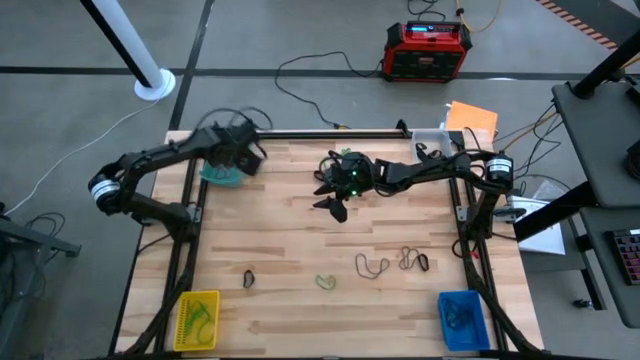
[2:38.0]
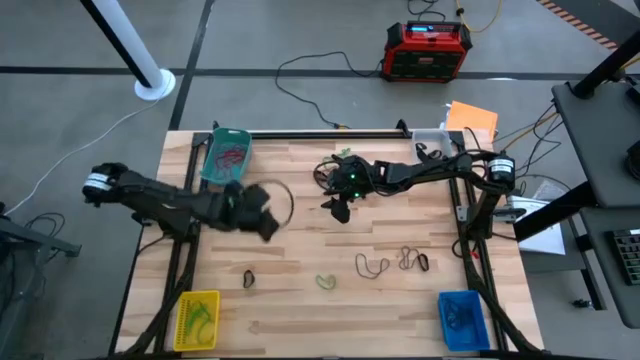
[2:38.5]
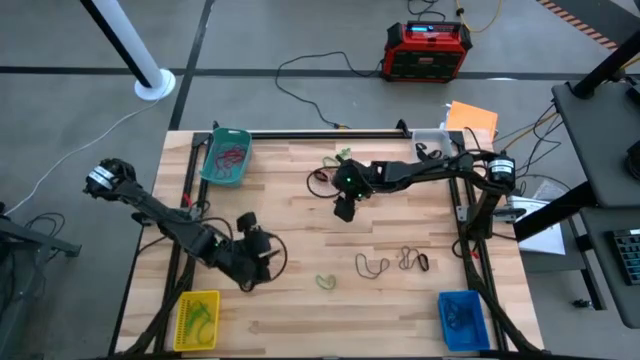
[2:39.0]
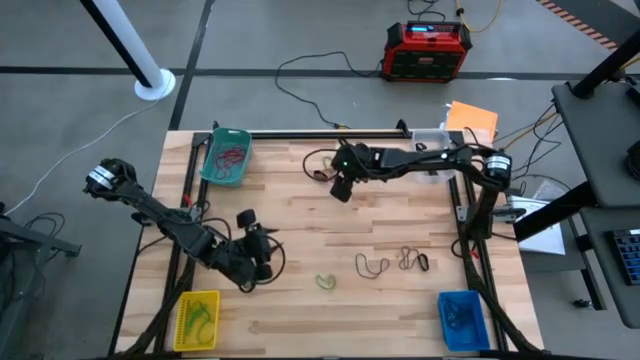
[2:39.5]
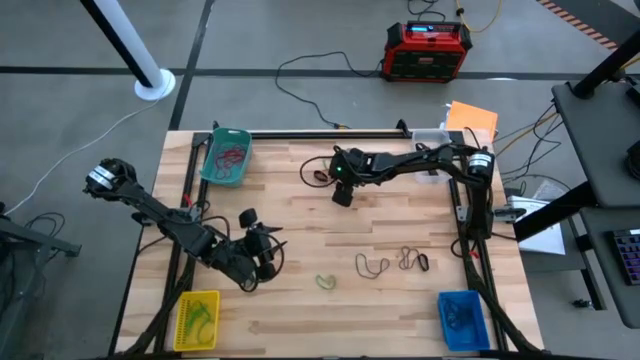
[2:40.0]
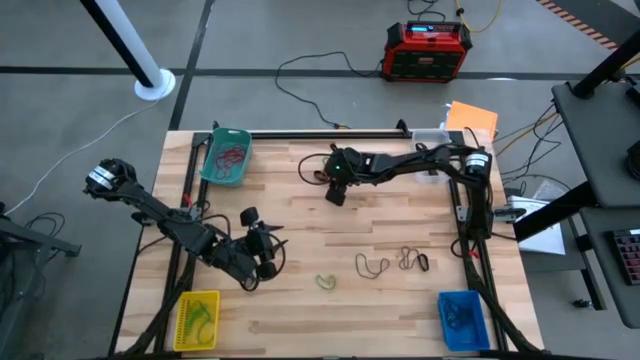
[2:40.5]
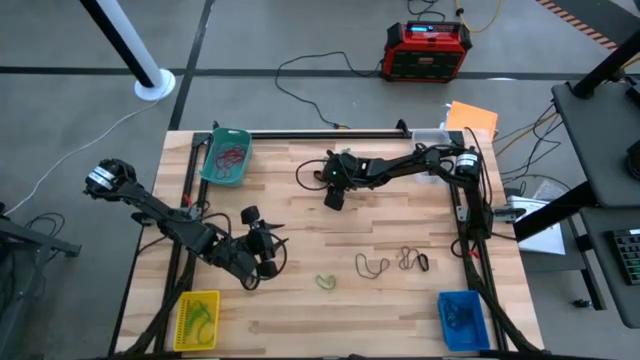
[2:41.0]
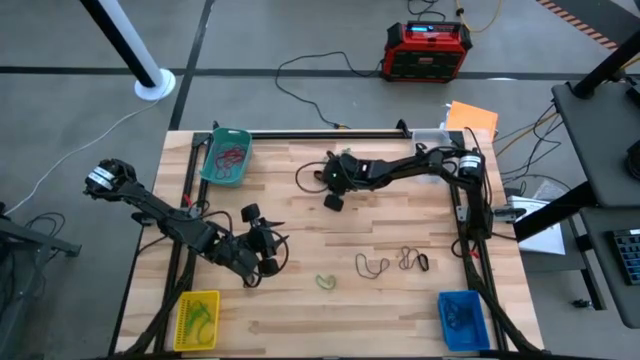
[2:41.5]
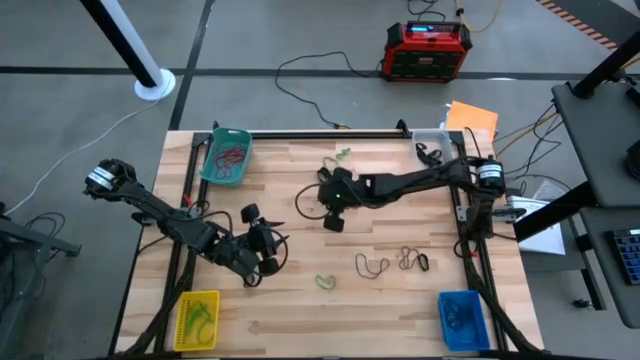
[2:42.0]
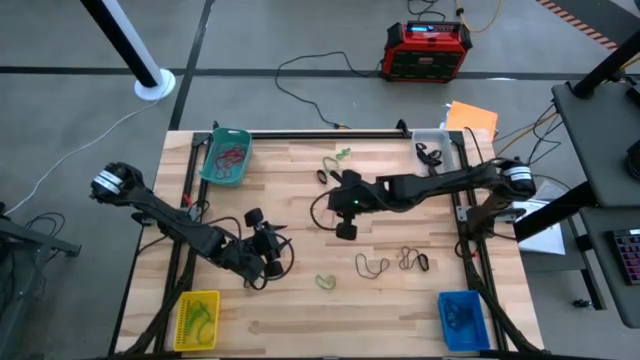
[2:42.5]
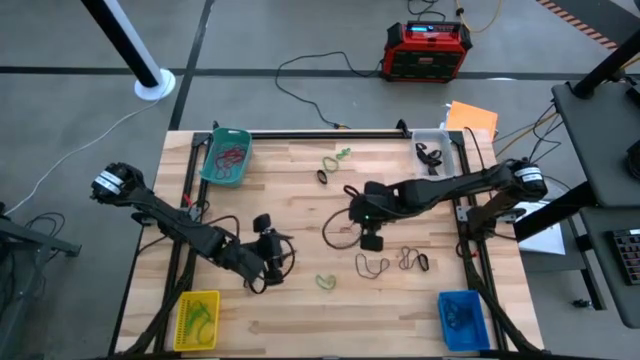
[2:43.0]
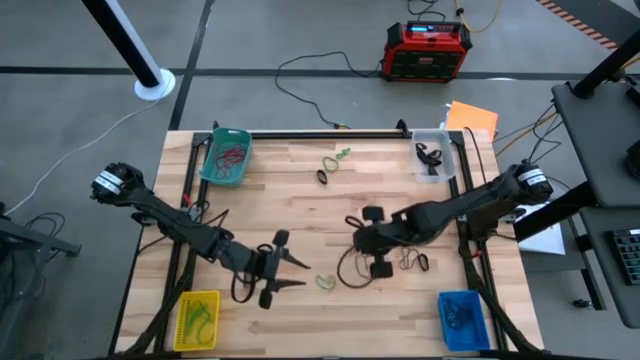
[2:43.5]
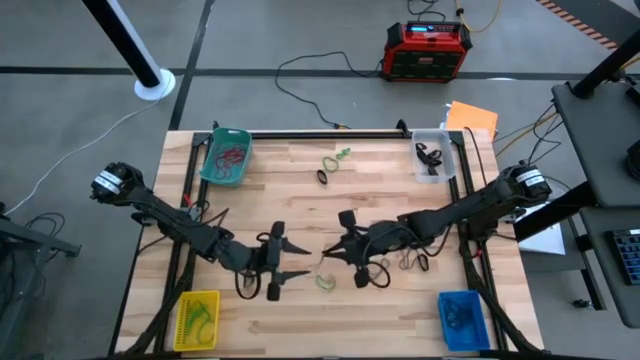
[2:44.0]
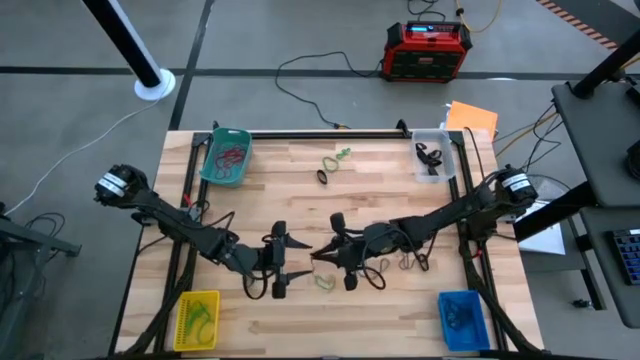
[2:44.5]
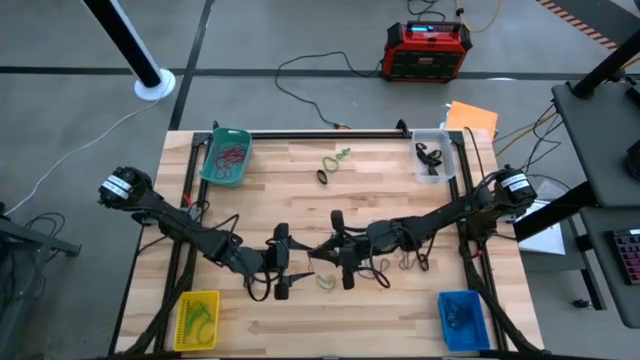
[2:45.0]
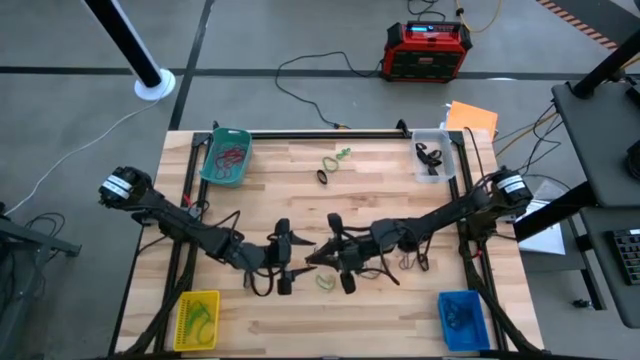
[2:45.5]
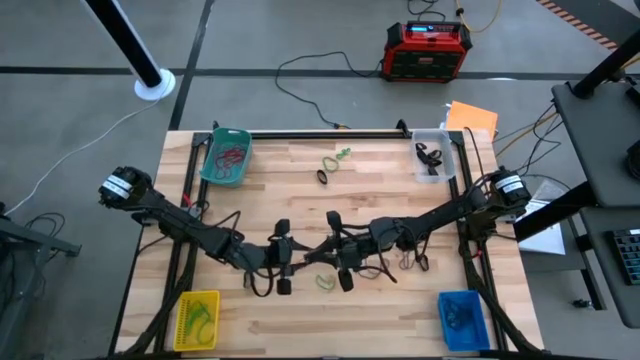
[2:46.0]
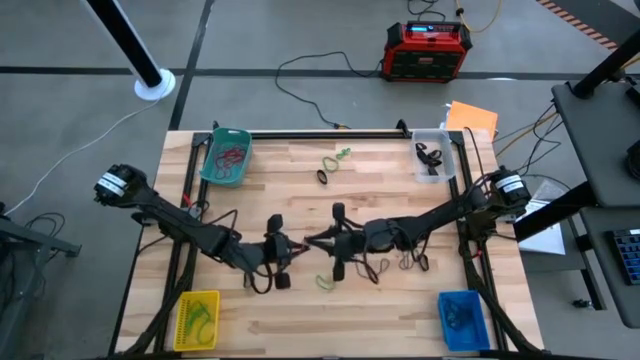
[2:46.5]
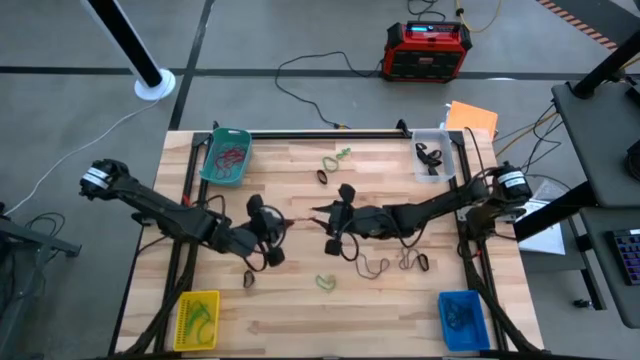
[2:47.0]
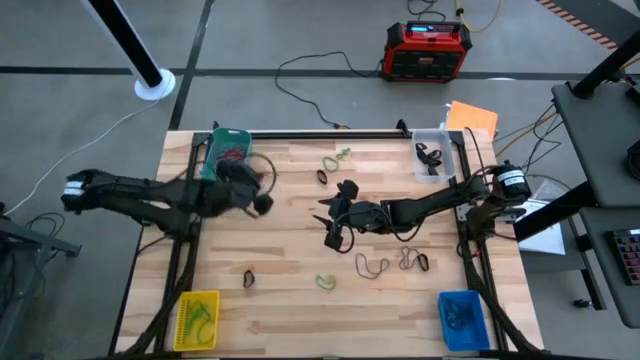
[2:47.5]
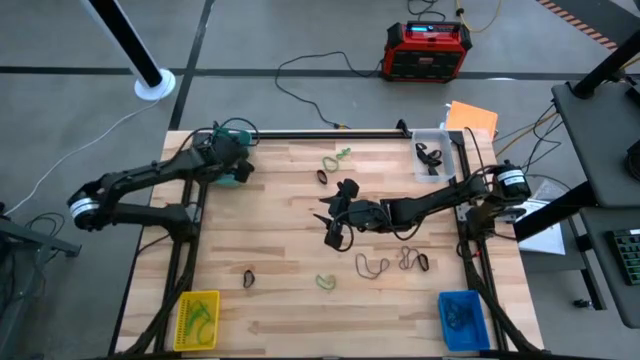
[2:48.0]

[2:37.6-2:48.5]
Task: Sort rubber bands into baskets
Put the red rubber band into the green bin

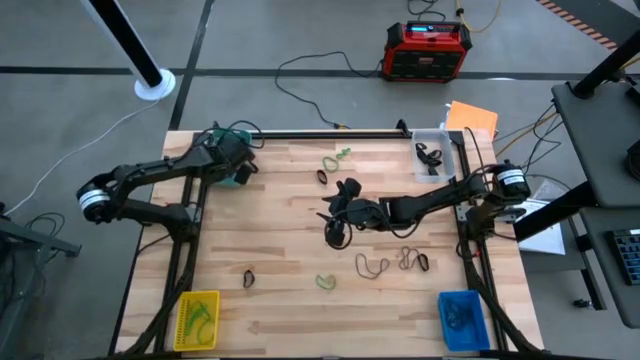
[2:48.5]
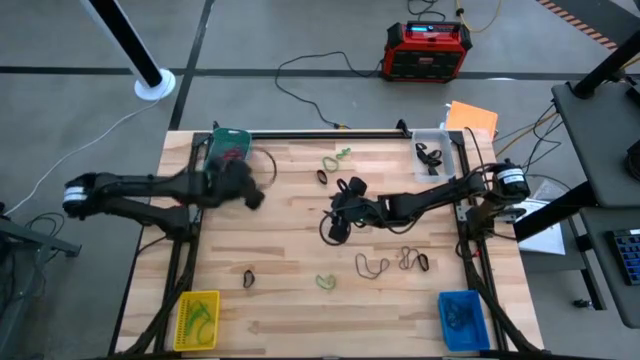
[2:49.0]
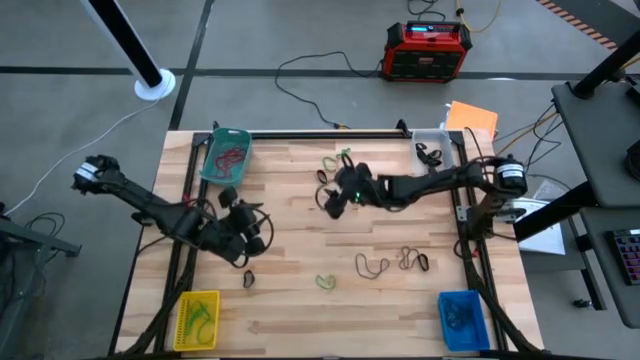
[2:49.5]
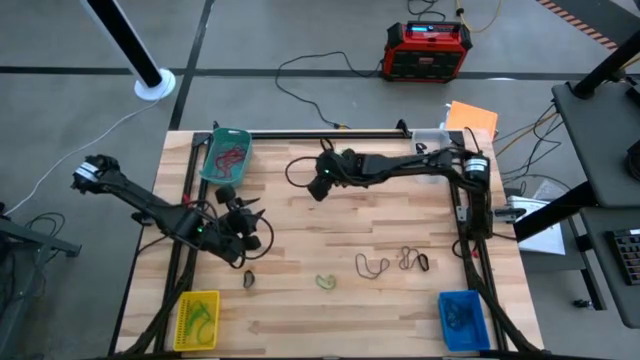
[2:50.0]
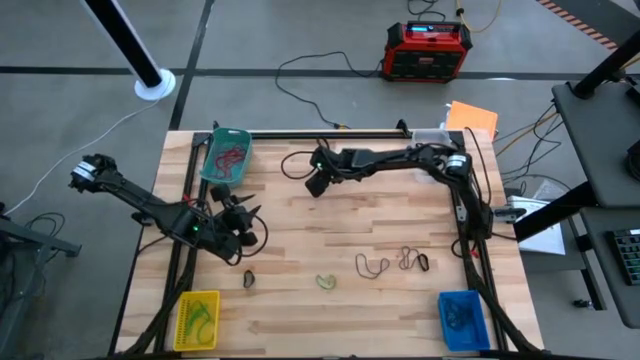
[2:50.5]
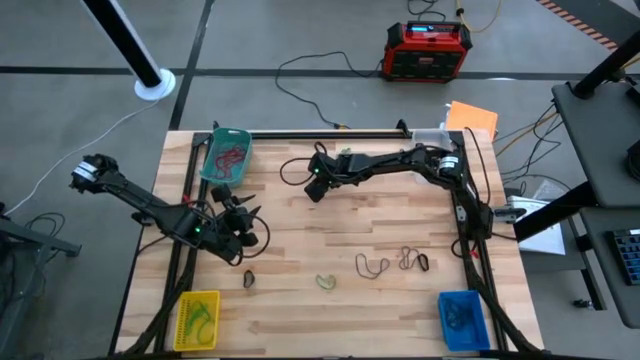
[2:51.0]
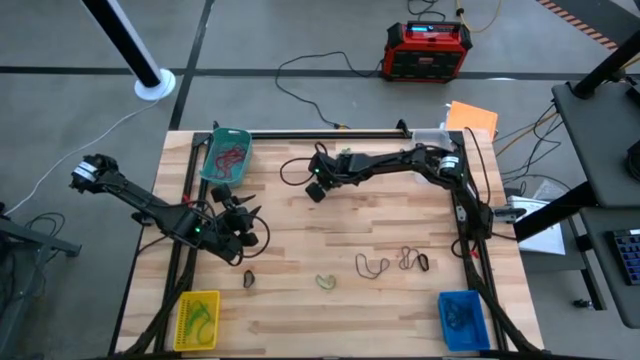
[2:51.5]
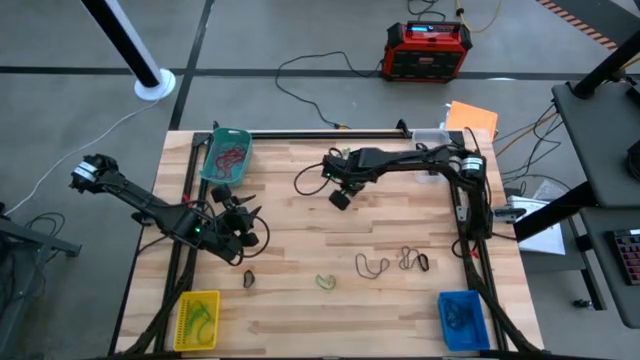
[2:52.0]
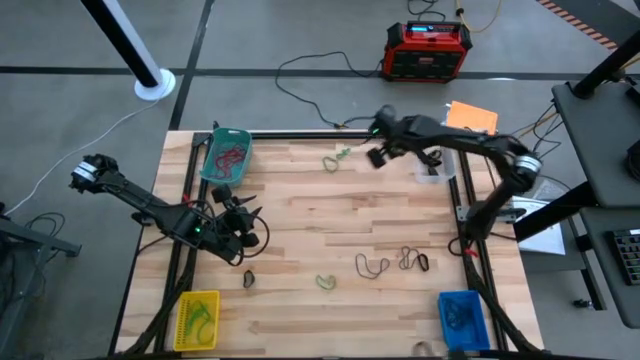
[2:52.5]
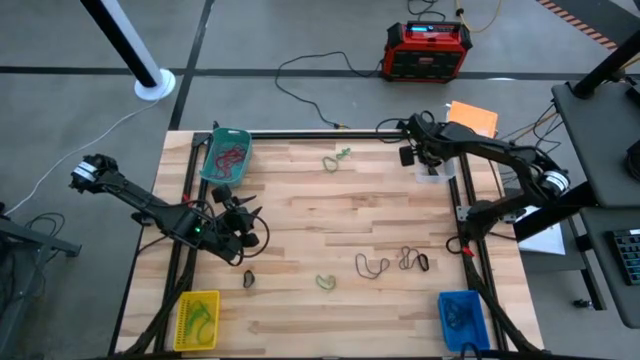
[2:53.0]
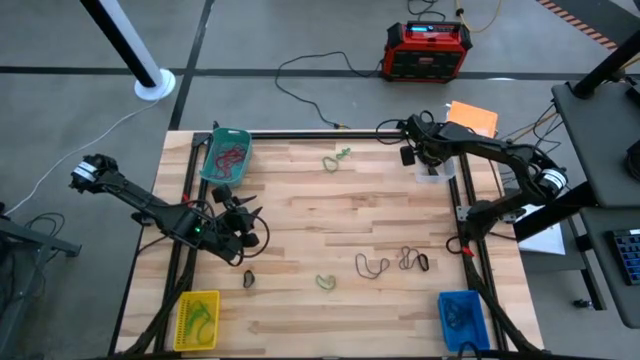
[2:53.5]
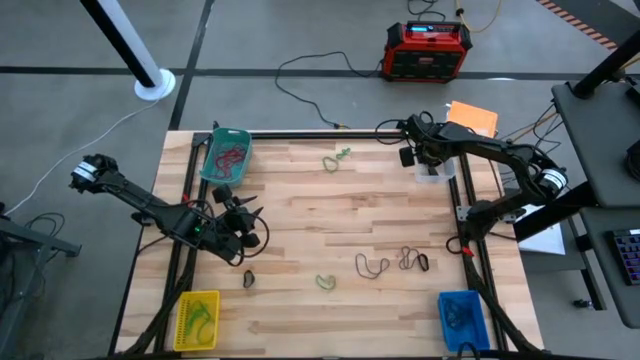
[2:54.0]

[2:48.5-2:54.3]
Put the black rubber band into the transparent bin

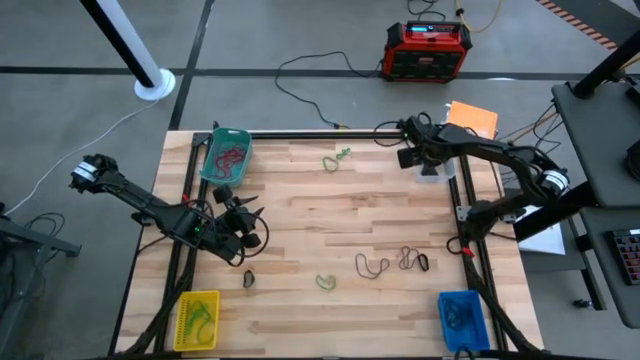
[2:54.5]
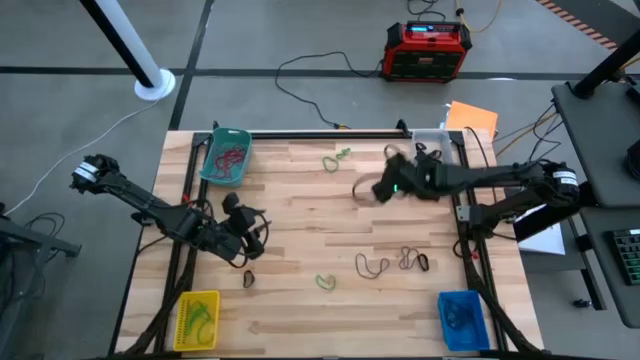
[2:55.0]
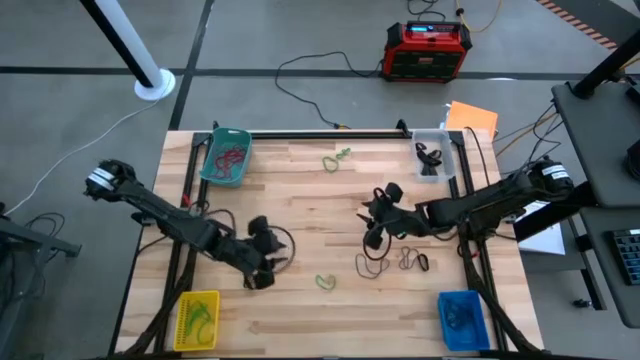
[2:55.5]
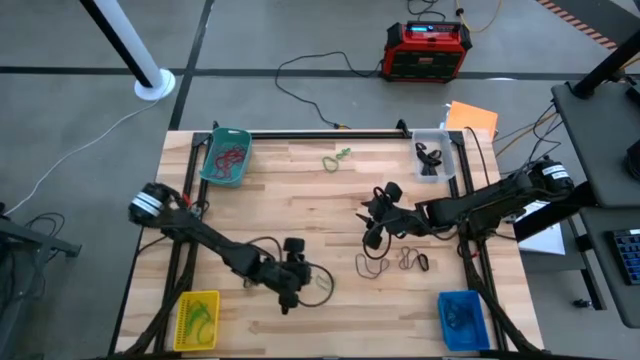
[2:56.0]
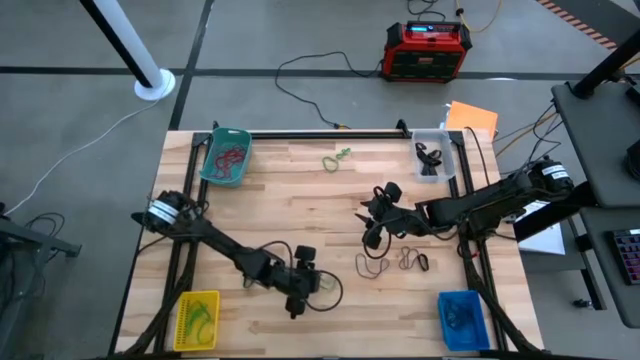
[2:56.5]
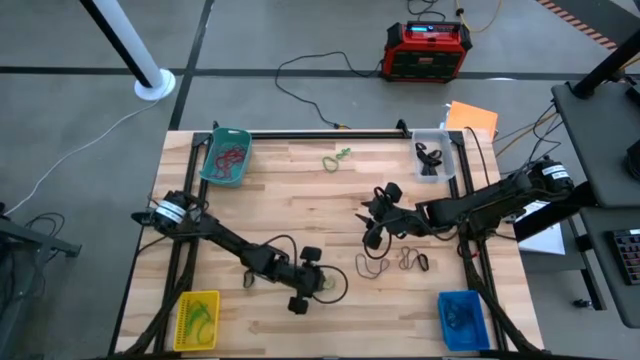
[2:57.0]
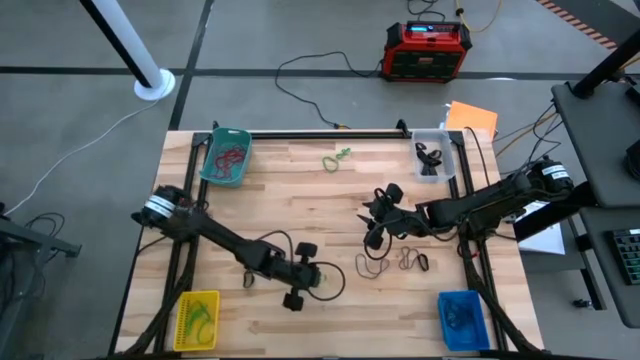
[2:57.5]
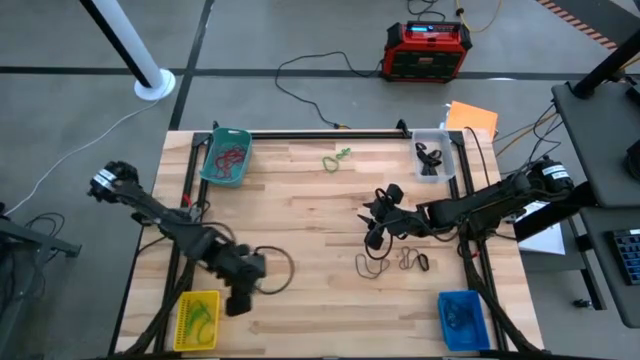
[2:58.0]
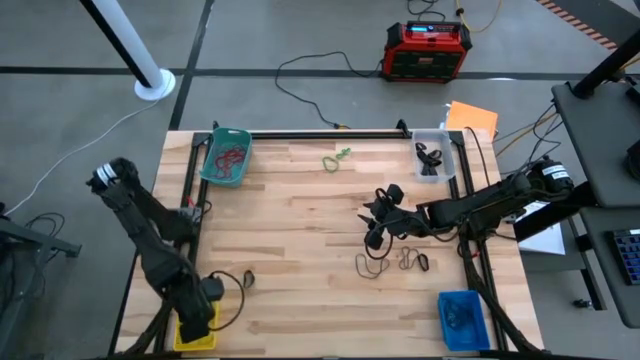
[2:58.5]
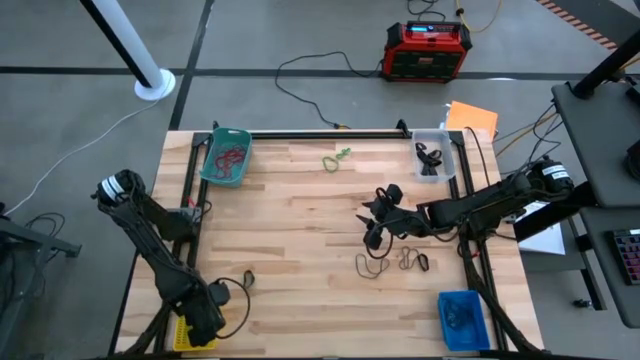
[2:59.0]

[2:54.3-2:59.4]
Put the green rubber band into the yellow bin
